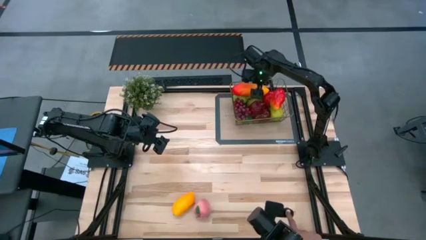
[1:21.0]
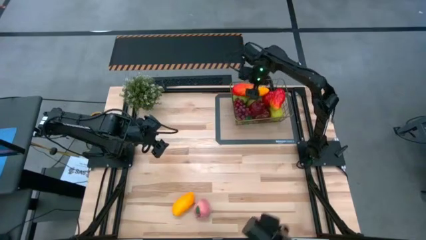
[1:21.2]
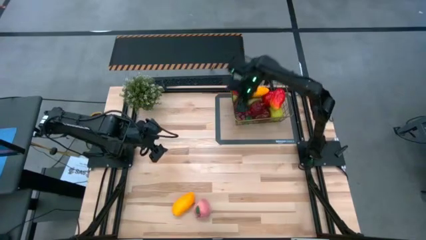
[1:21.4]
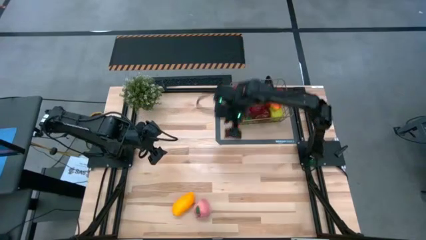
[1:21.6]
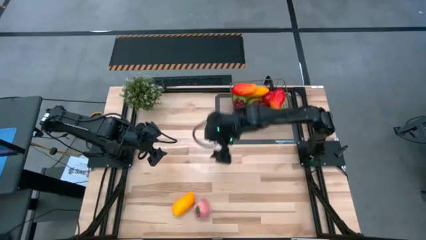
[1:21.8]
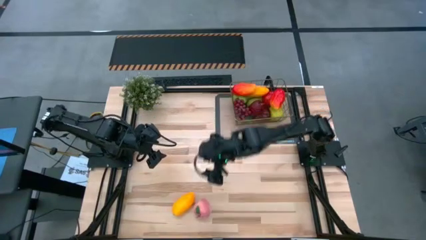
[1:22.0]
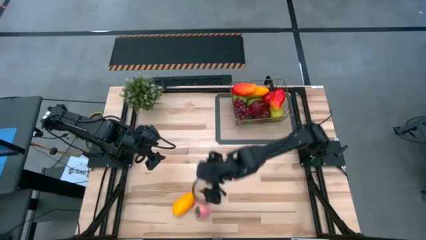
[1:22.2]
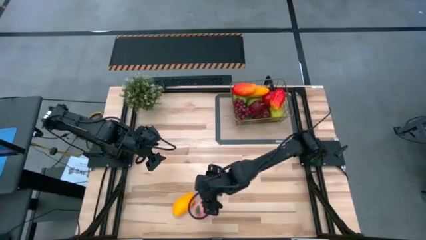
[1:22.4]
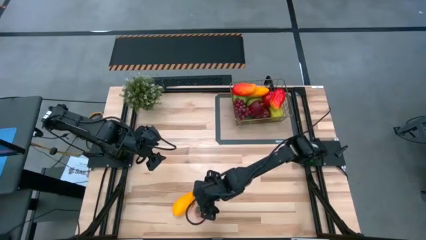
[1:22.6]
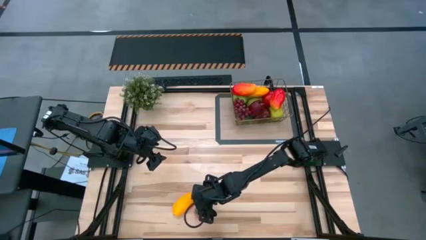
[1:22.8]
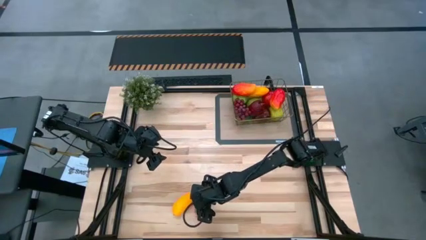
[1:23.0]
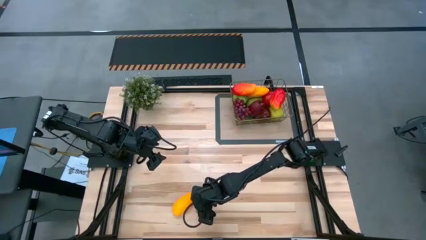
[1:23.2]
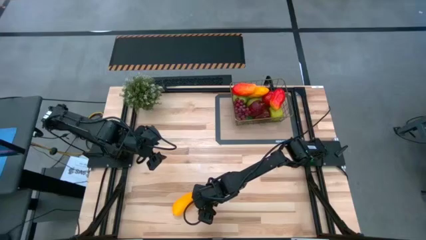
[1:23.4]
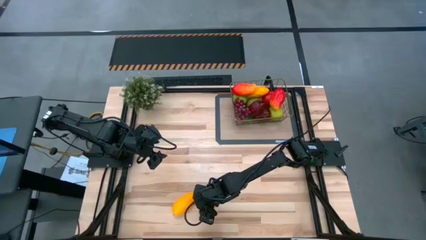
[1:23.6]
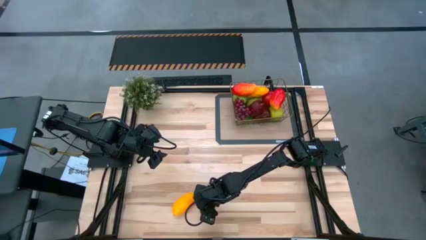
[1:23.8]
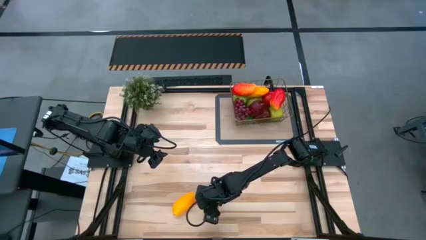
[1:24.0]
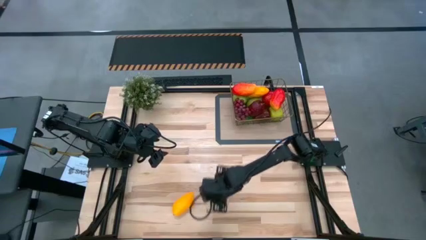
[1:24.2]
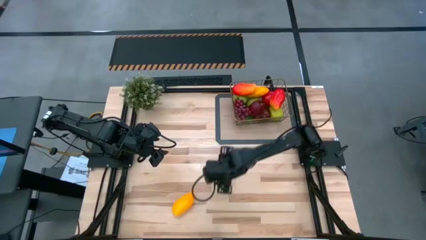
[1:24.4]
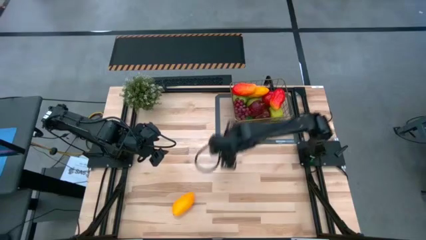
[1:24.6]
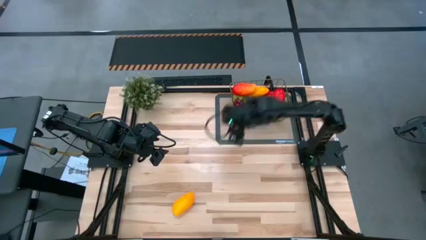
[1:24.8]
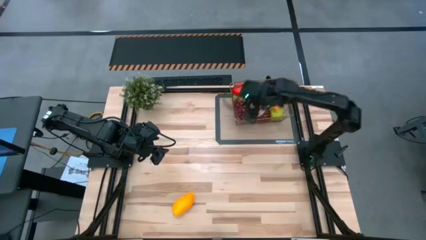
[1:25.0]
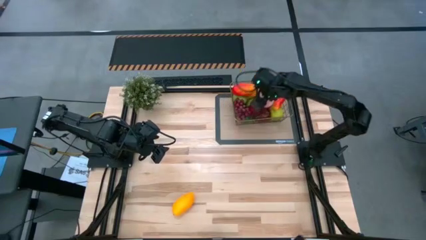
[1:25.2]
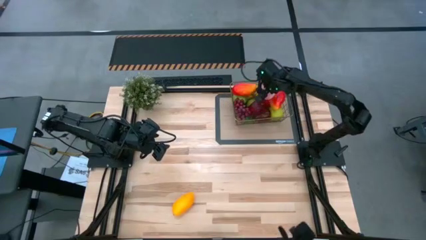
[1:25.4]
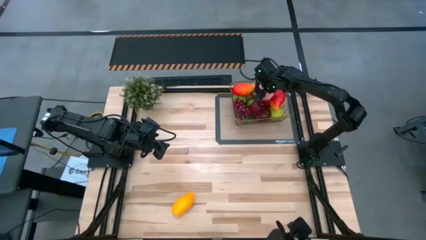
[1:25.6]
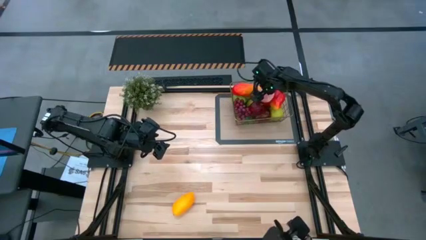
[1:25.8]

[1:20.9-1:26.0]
Task: Build produce basket
Put the peach into the gold wire basket

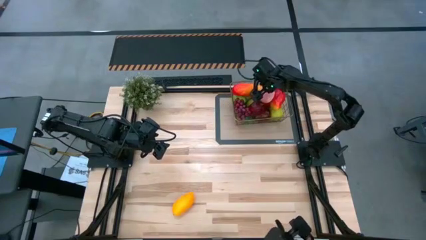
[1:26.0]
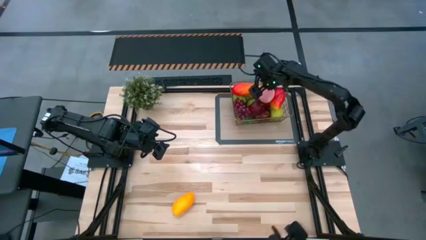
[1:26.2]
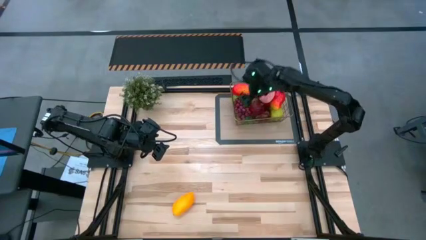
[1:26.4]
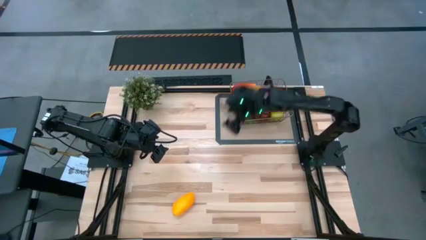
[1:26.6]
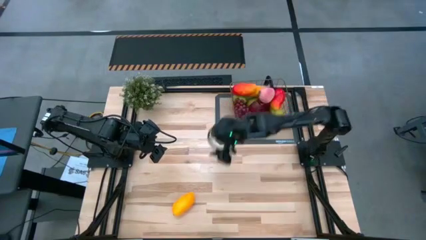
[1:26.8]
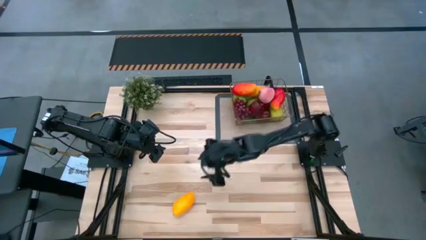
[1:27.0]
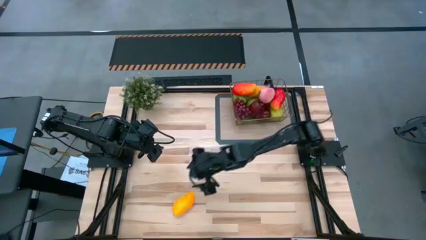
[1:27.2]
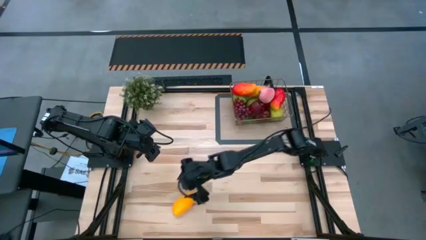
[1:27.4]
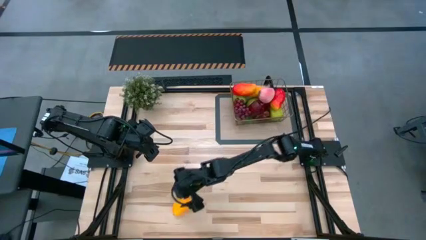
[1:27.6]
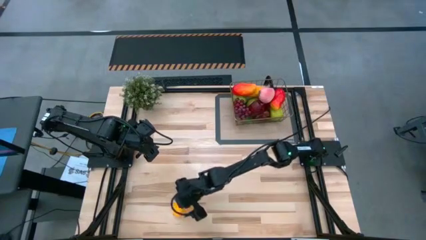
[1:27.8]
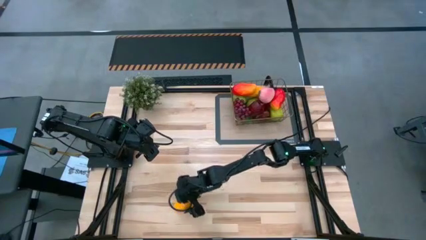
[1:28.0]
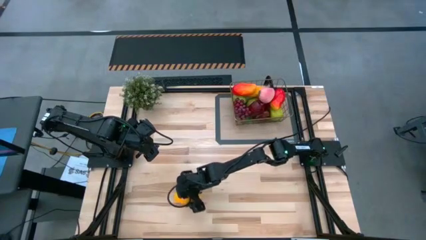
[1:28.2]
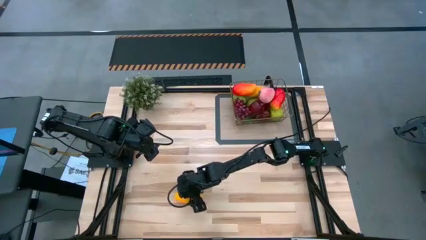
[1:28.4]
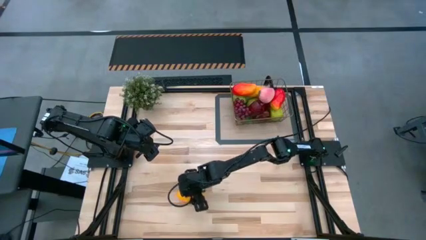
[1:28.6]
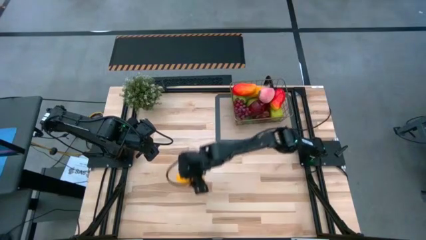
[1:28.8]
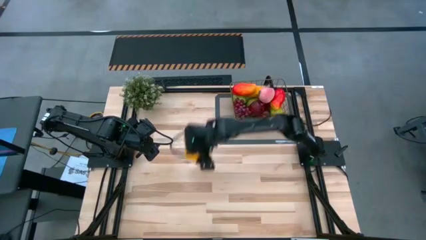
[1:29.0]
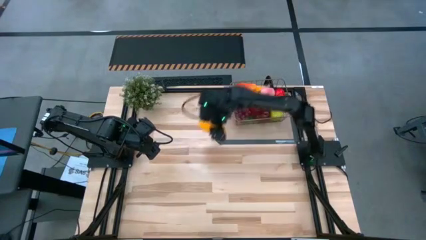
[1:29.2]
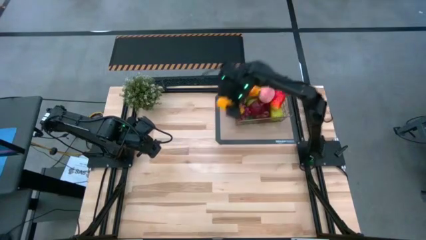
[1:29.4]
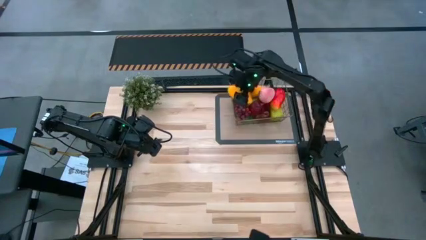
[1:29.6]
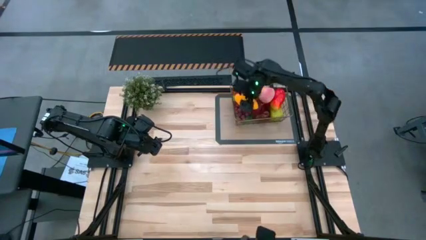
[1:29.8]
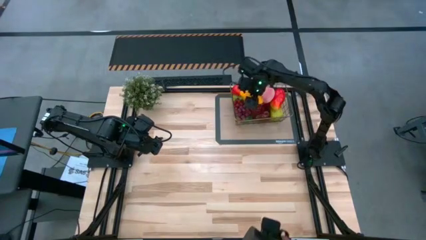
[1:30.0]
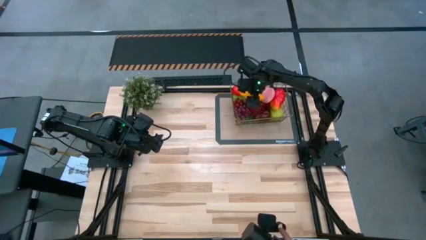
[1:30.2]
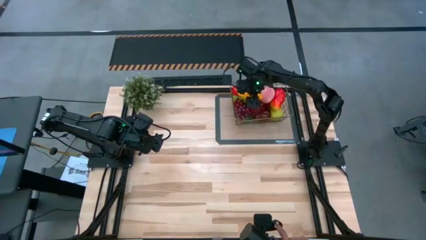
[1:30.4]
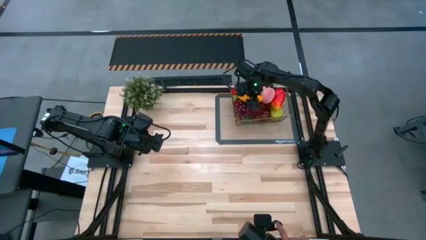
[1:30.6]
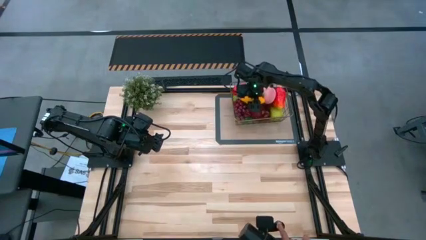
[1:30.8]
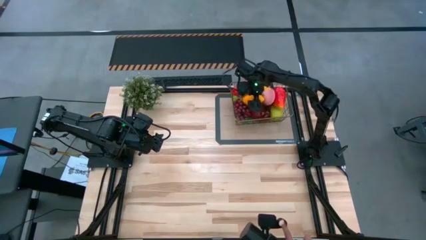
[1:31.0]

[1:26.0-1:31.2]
Put the yellow mango into the gold wire basket

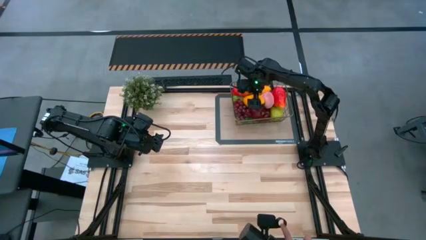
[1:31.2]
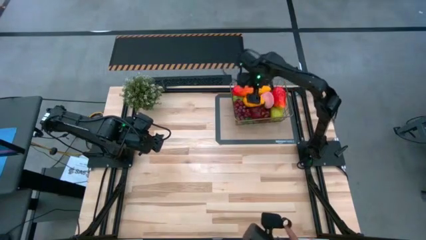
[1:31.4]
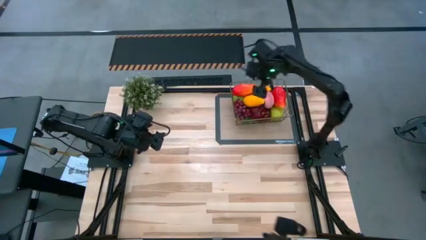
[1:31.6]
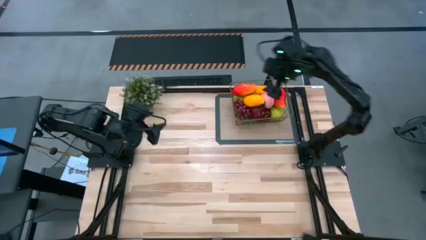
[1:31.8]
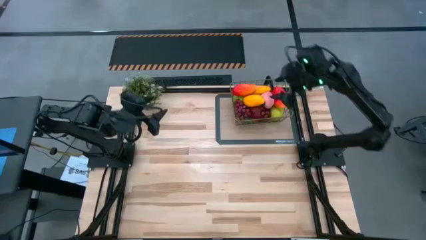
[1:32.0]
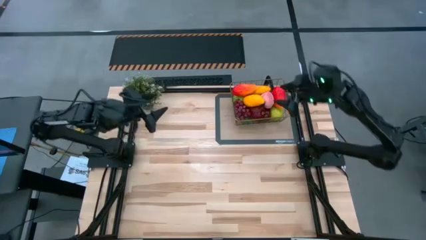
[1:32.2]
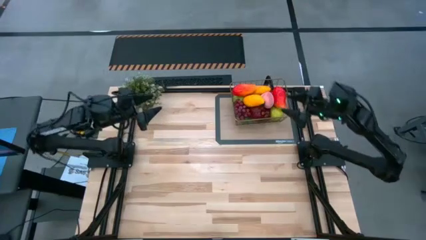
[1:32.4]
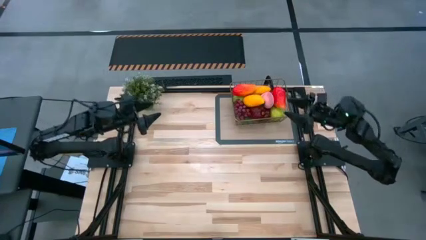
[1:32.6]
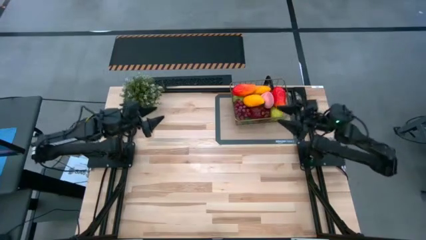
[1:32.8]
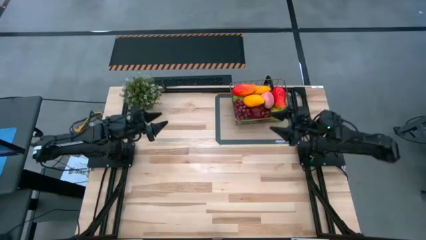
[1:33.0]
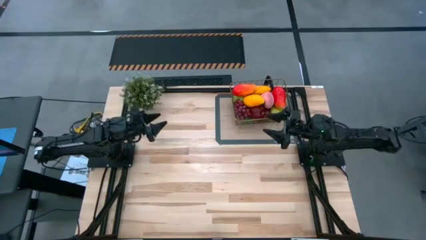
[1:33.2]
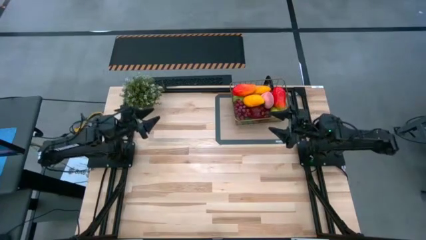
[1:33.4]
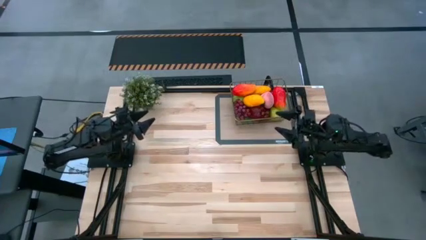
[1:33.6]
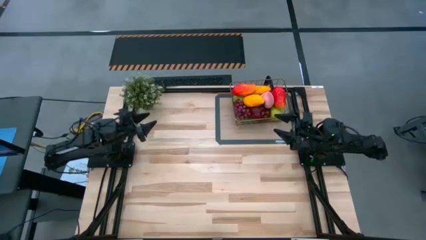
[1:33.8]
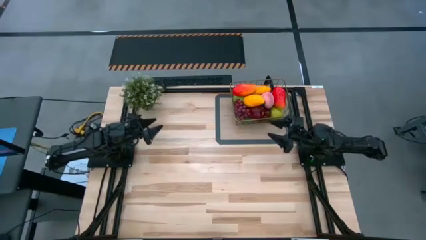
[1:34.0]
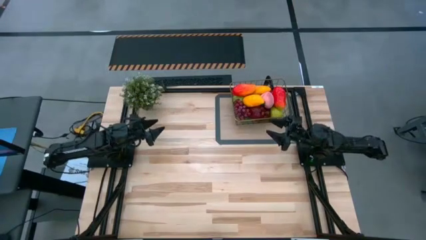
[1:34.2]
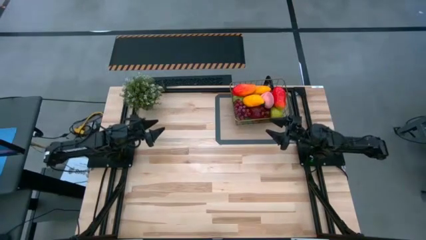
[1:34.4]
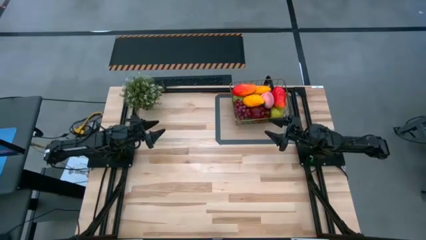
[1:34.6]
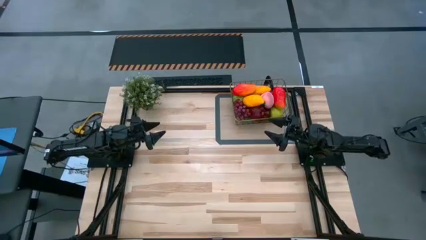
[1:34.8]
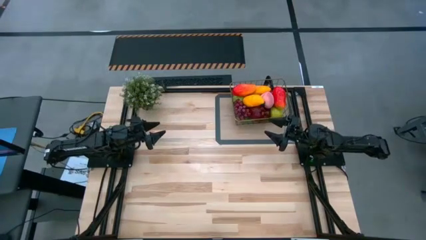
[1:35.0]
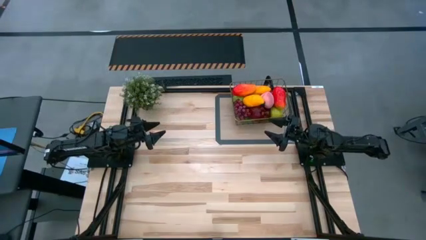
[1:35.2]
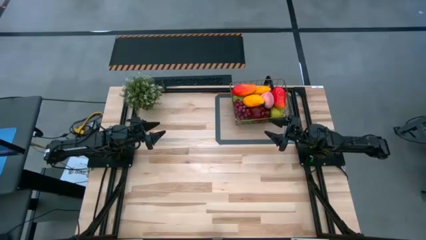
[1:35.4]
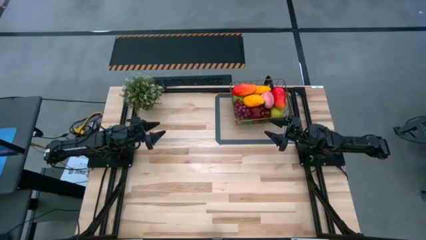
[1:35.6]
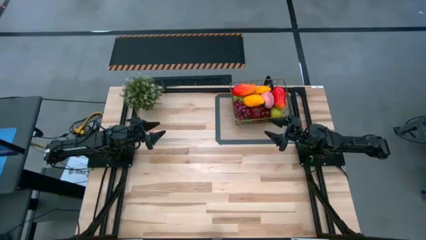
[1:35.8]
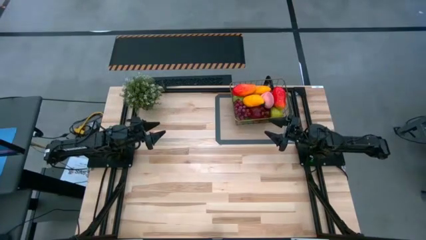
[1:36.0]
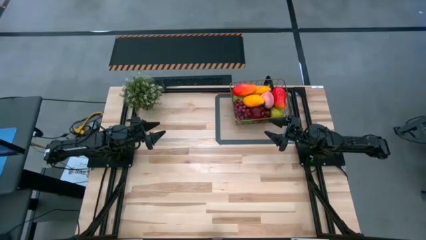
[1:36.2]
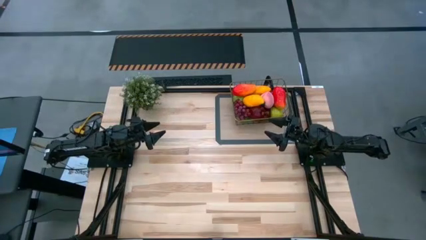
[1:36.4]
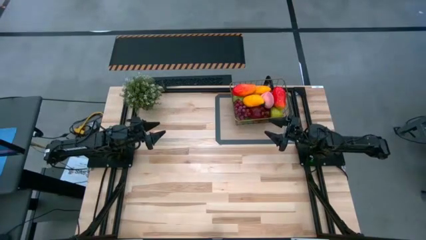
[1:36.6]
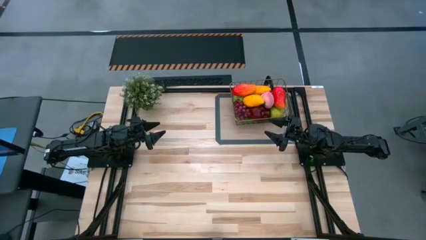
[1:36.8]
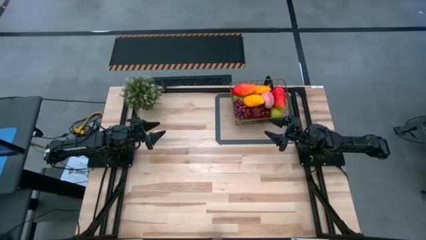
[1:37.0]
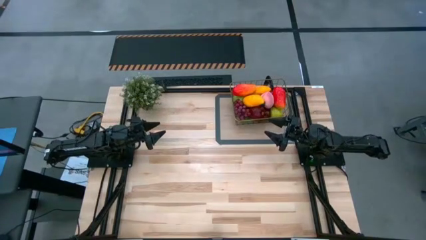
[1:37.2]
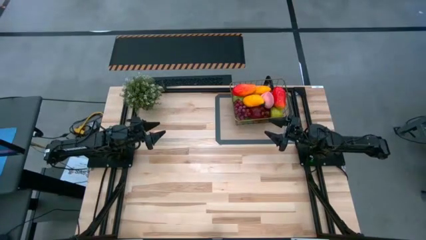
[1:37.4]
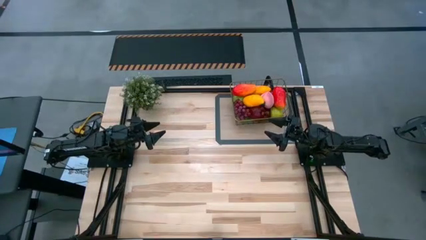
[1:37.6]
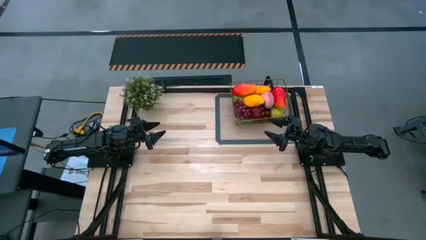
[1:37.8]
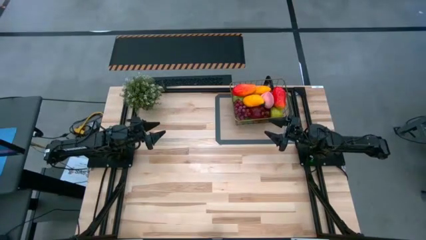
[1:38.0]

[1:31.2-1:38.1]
Return to Home Position
